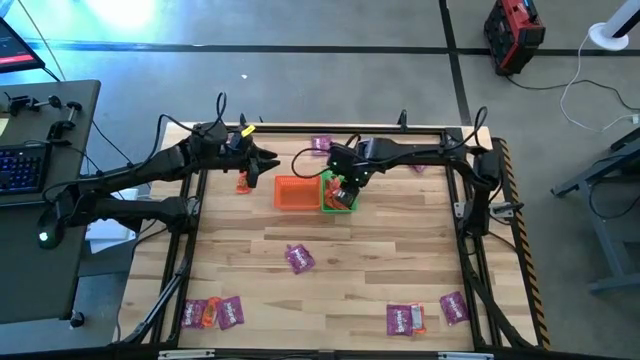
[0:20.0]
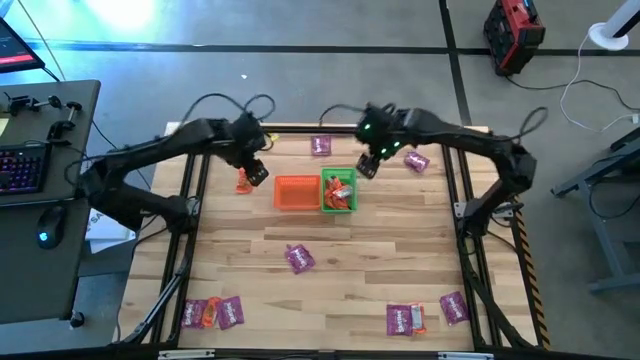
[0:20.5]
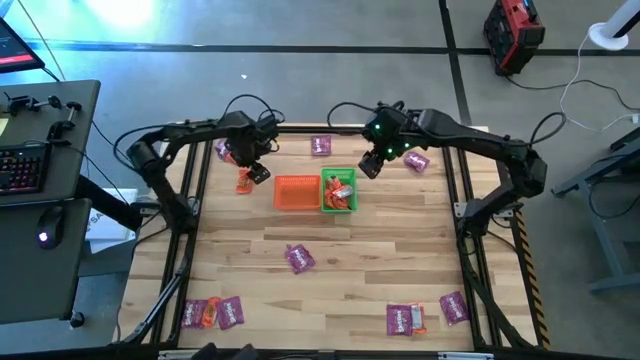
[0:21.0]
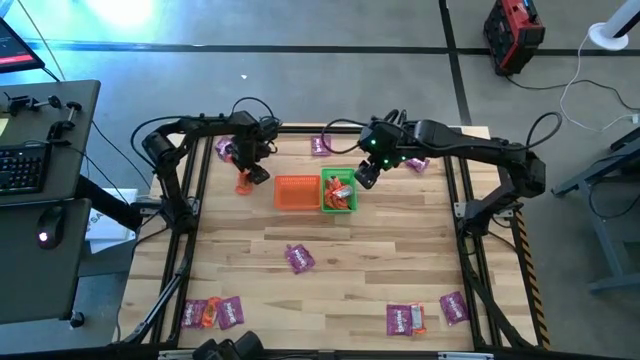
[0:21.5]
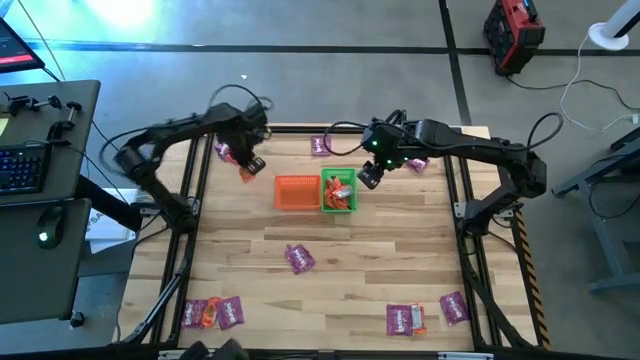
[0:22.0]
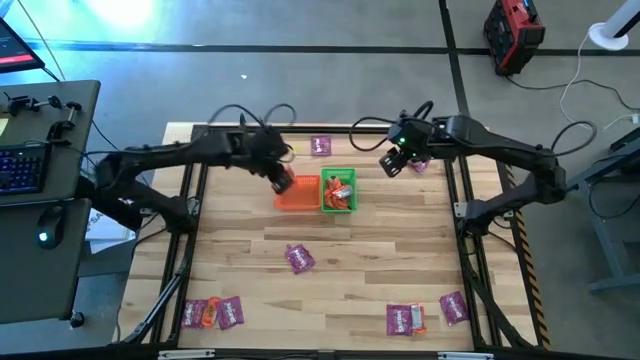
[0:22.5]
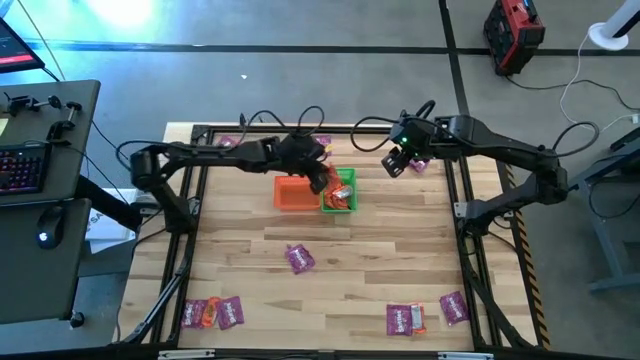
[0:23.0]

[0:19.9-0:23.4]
Task: Sort candy by brand, put in halloween buckets
Put the orange chocolate into the green bin

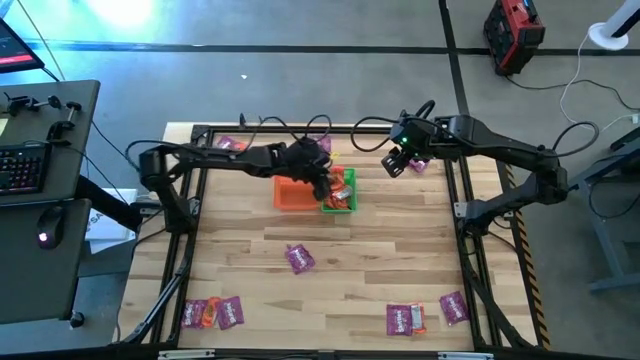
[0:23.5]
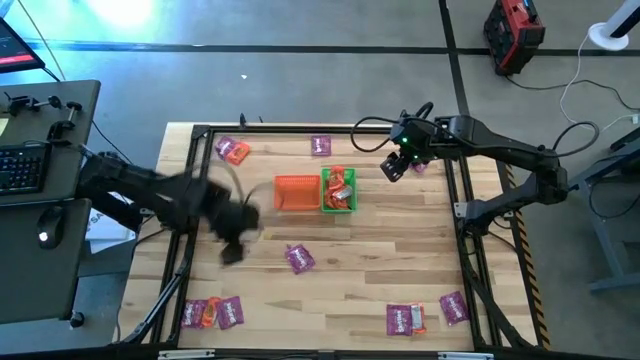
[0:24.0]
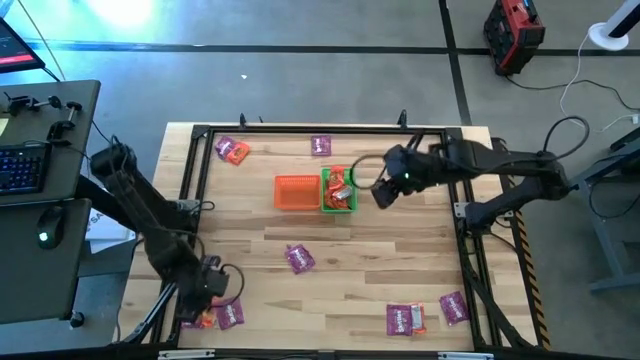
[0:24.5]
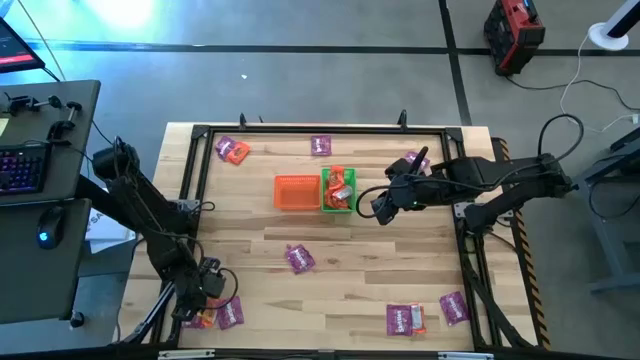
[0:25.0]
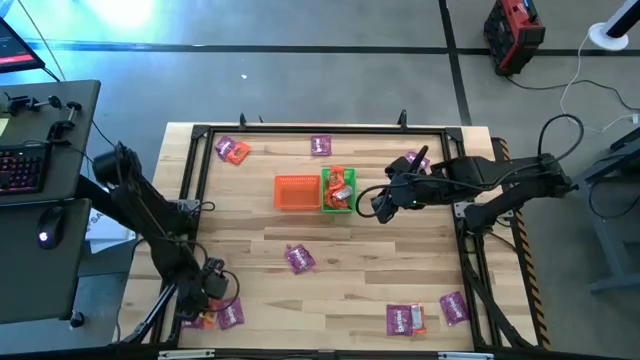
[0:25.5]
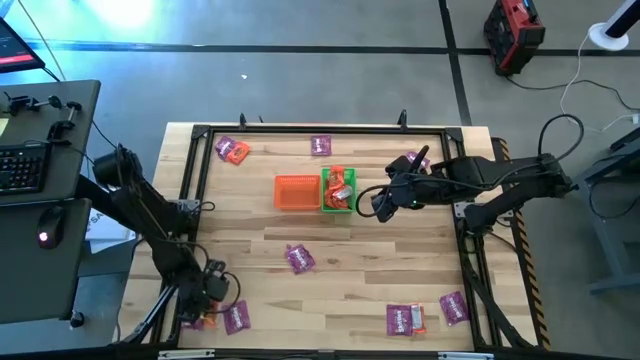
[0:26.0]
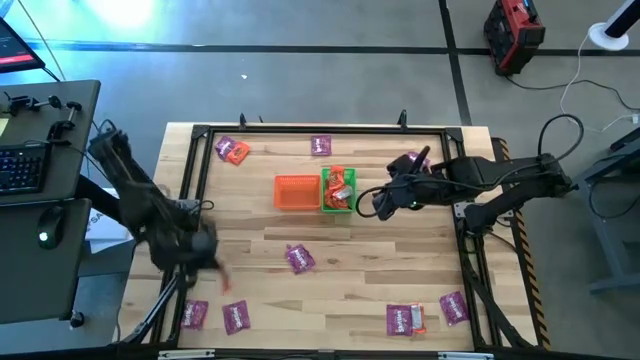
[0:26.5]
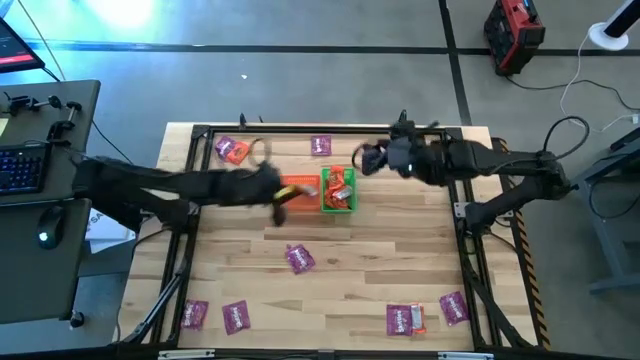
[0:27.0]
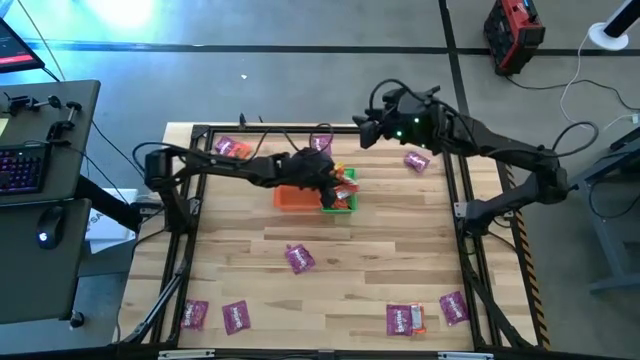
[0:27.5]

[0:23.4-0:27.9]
Put the orange chocolate into the green bin

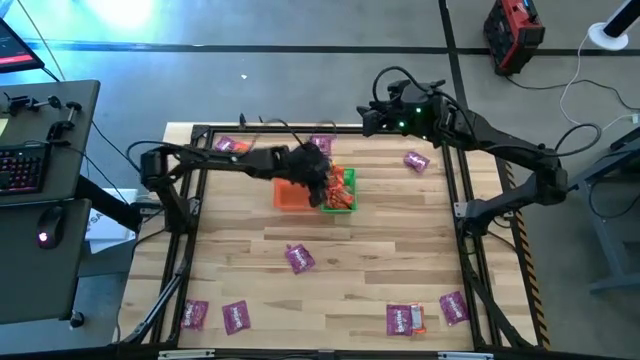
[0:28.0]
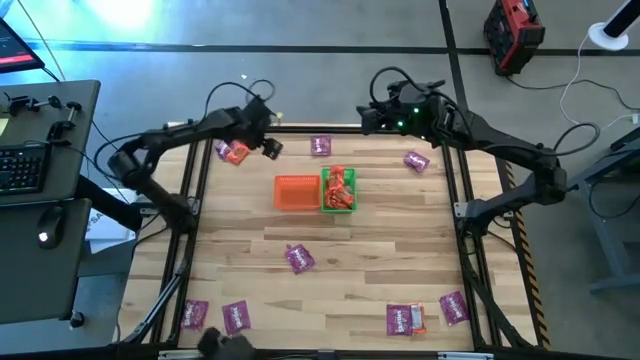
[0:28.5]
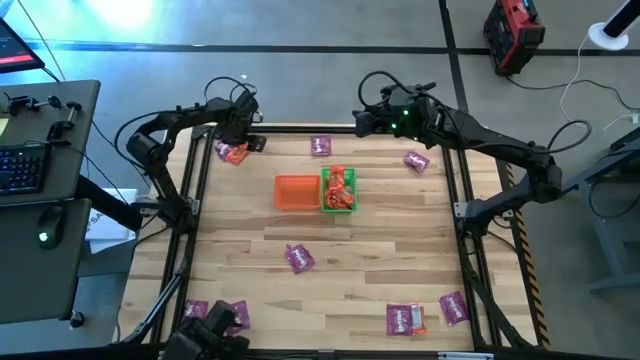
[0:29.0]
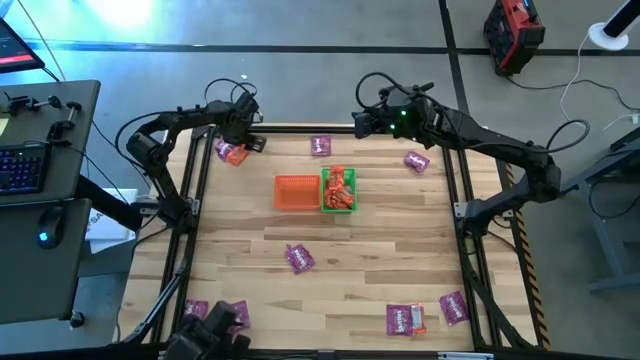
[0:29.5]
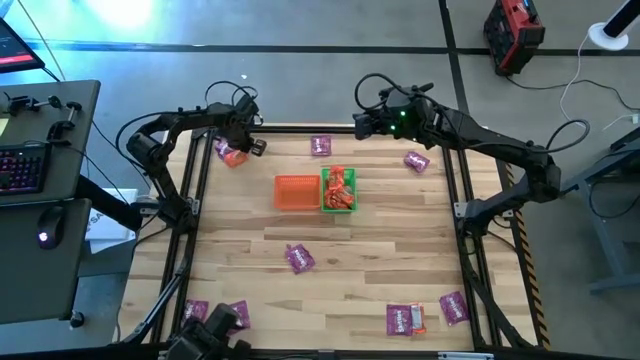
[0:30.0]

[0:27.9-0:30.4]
Put the orange chocolate into the green bin

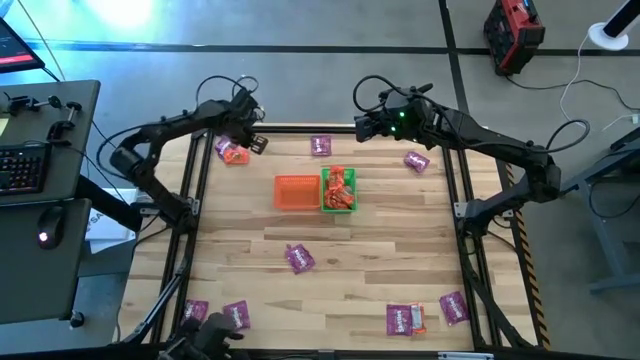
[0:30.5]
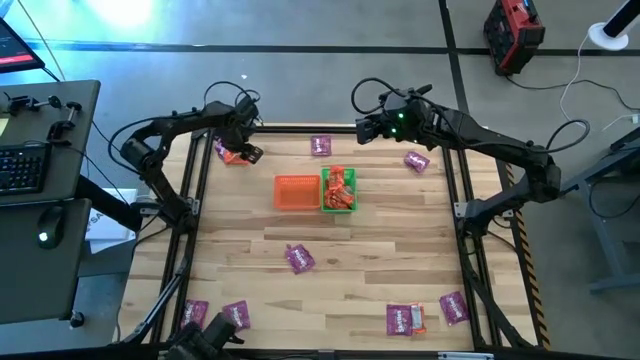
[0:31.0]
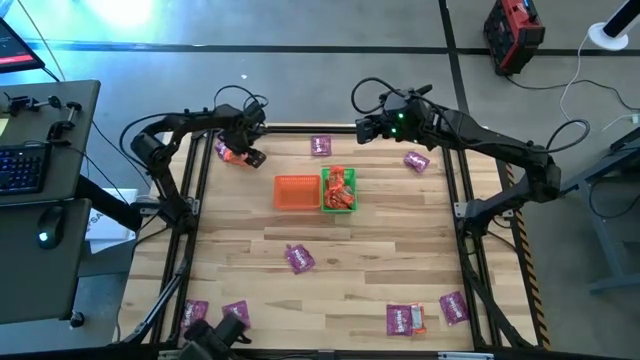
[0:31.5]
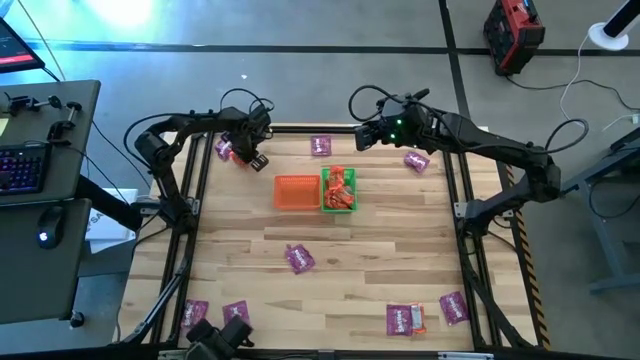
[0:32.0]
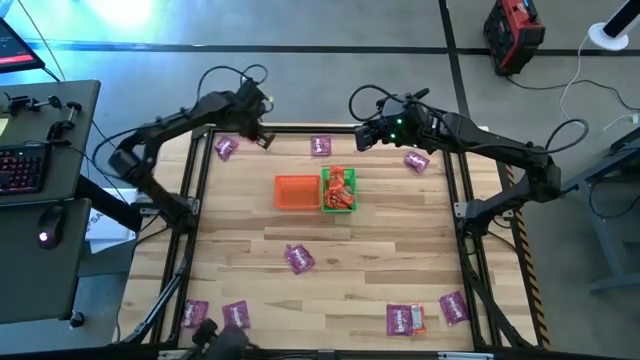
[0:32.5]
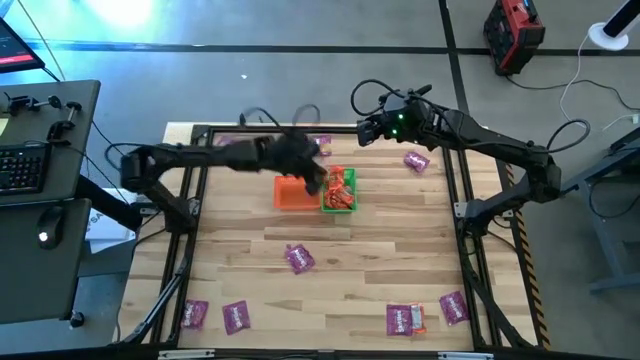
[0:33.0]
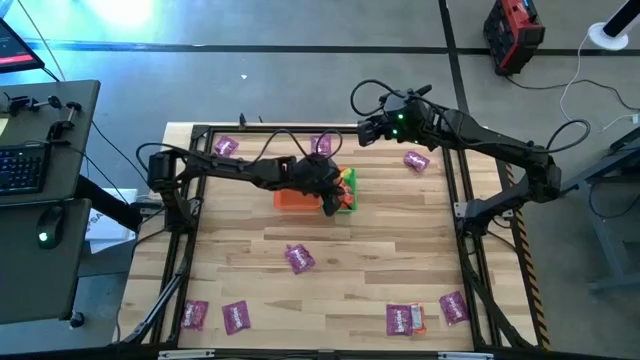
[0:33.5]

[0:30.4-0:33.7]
Put the orange chocolate into the green bin

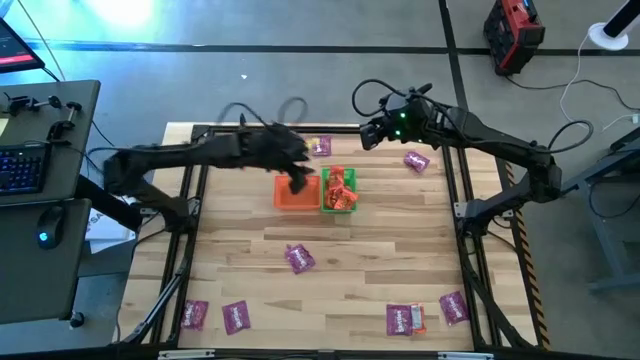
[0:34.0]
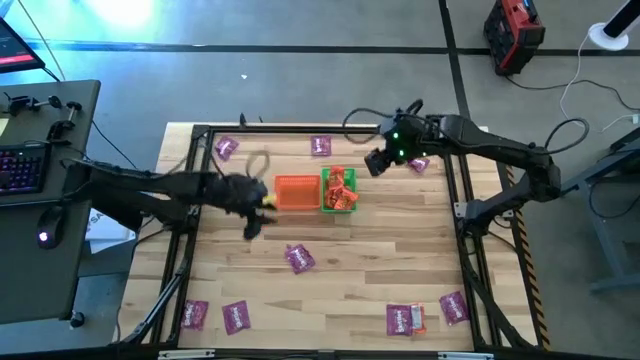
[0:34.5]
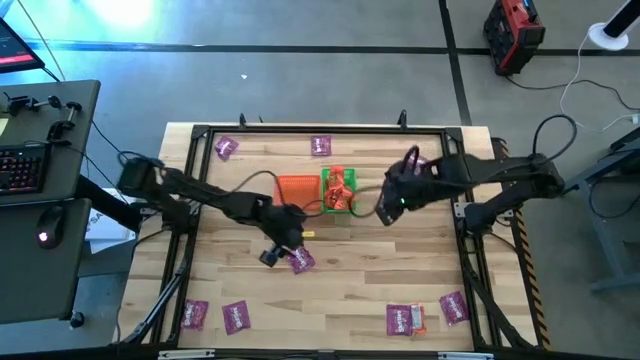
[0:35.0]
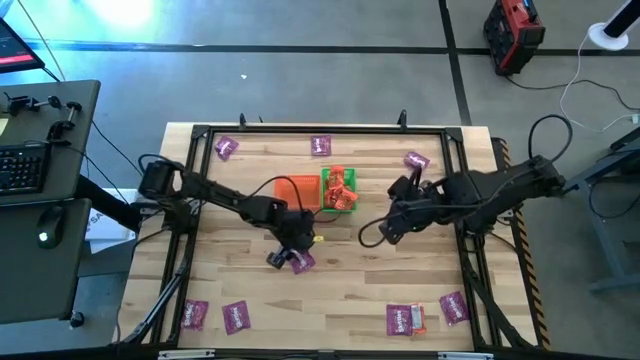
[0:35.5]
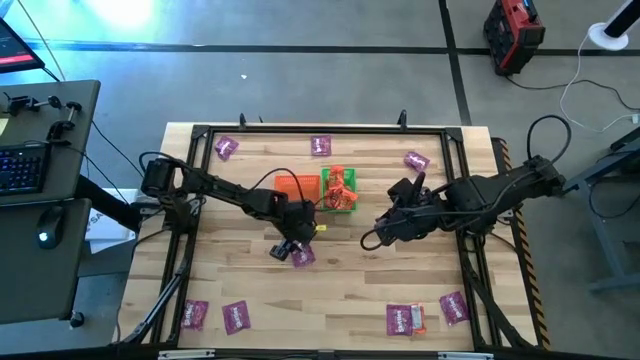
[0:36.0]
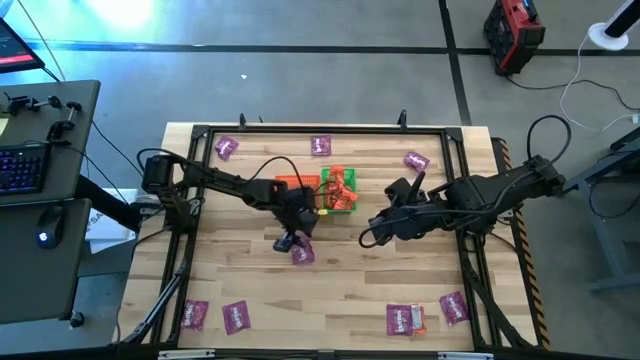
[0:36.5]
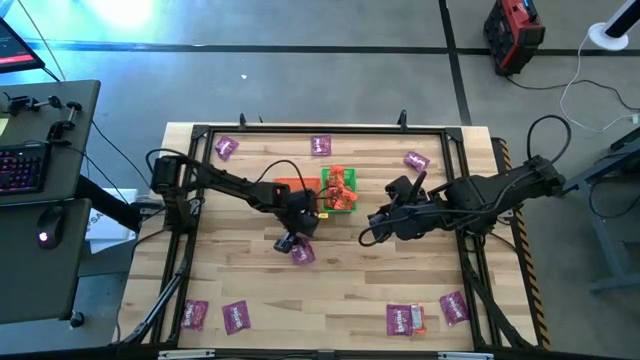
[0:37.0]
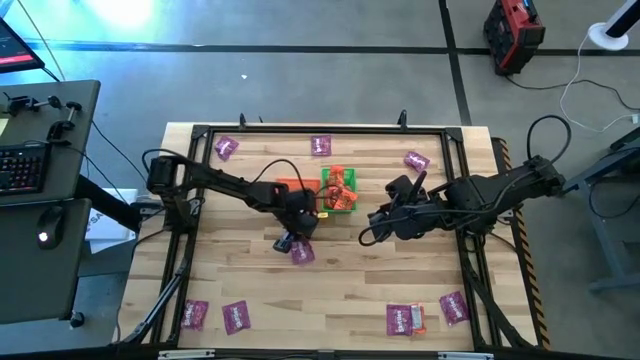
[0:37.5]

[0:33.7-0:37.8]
Put the violet candy into the orange bin

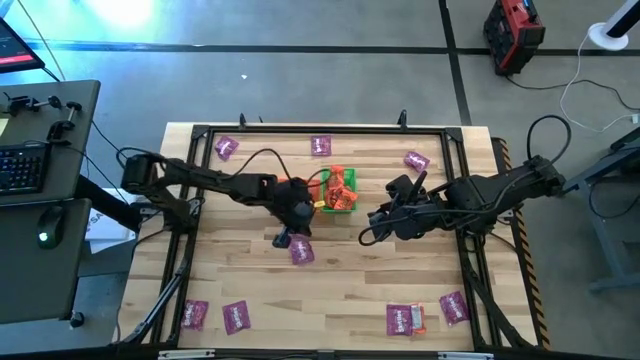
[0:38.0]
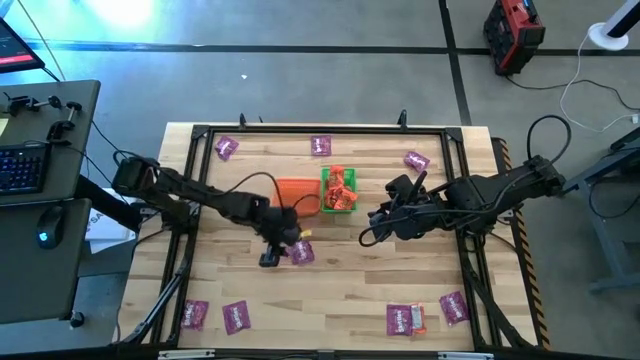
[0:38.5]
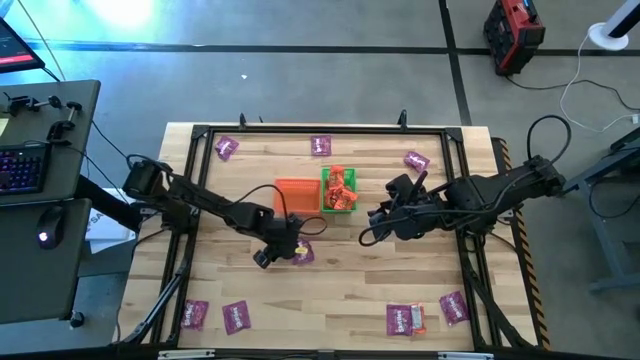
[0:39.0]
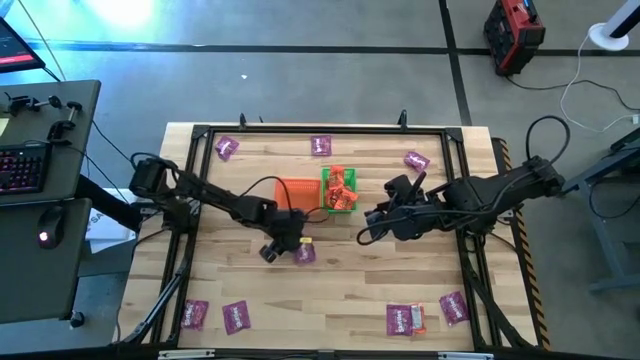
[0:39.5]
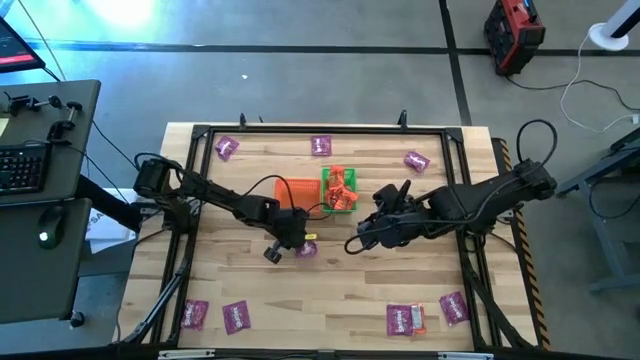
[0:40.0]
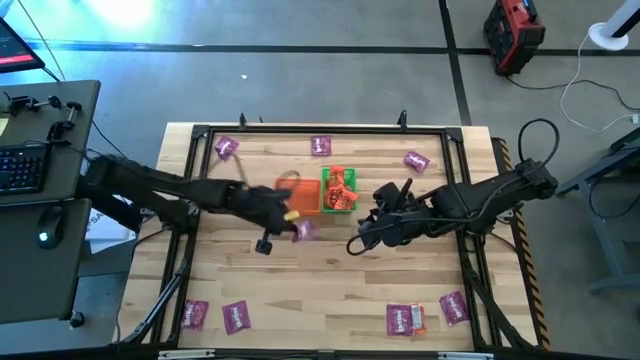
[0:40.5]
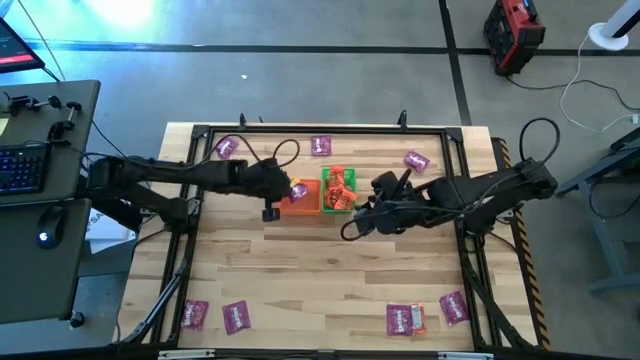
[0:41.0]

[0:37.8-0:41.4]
Put the violet candy into the orange bin
